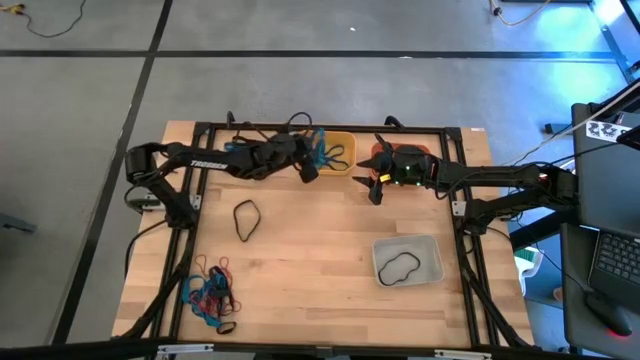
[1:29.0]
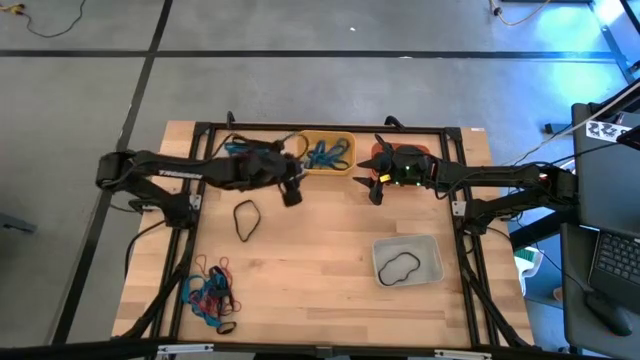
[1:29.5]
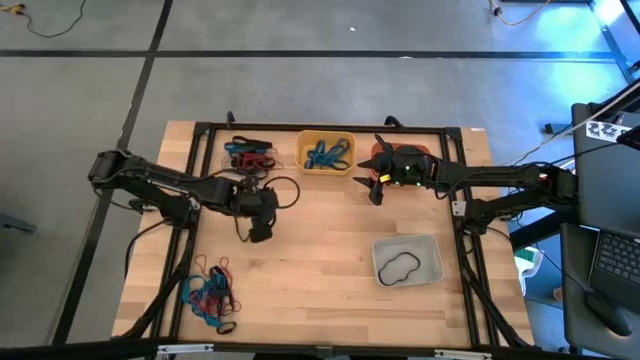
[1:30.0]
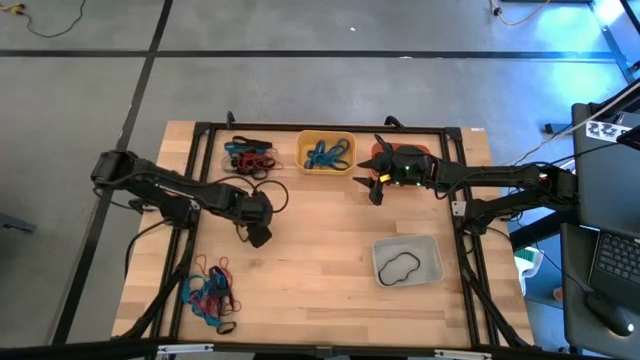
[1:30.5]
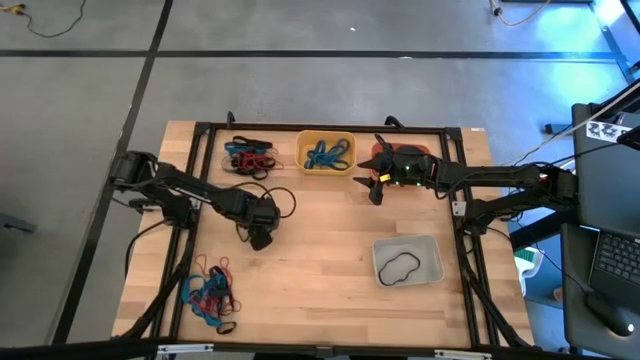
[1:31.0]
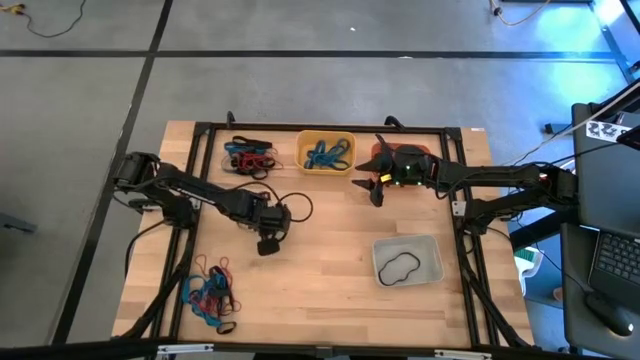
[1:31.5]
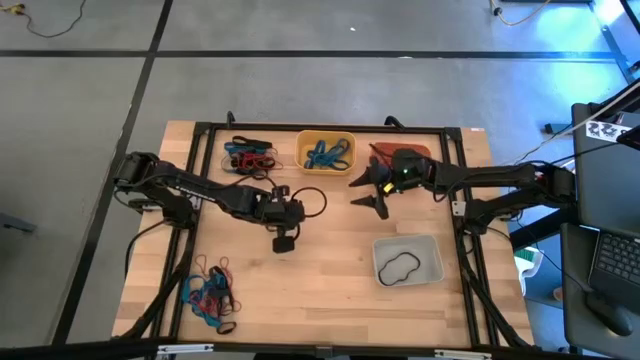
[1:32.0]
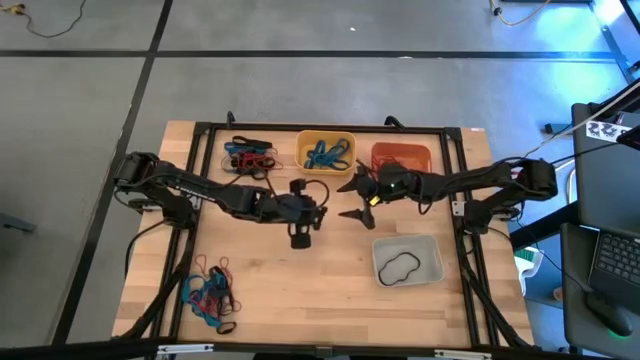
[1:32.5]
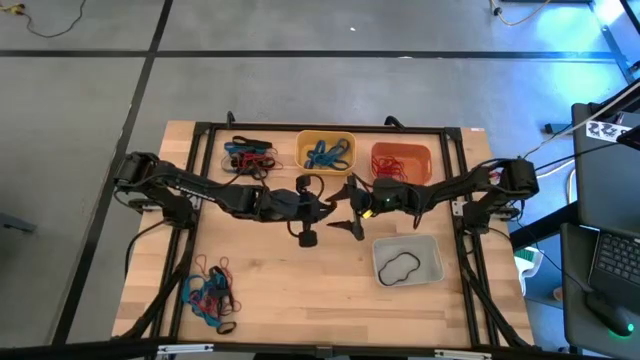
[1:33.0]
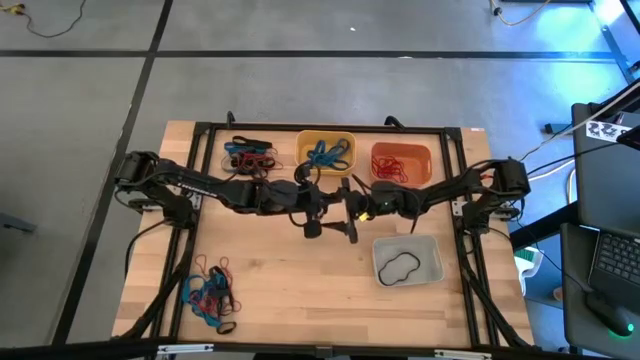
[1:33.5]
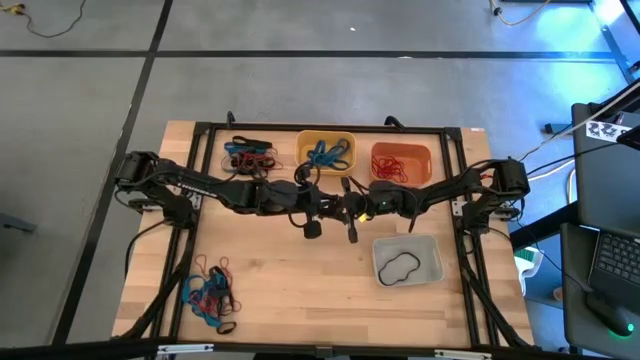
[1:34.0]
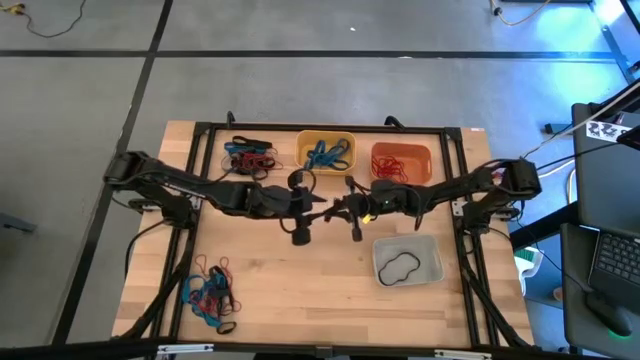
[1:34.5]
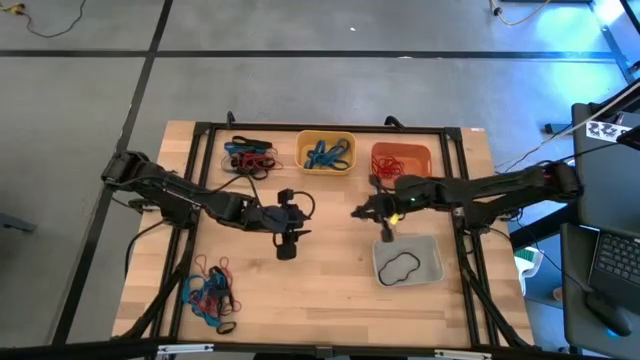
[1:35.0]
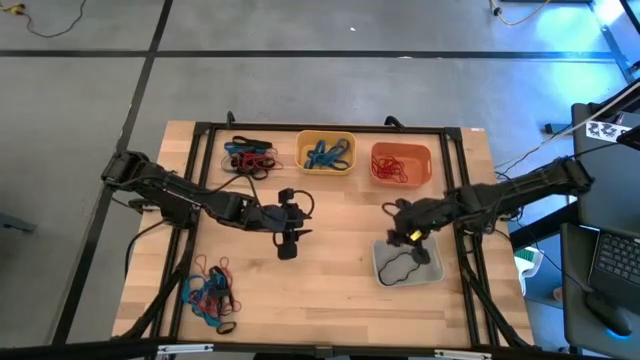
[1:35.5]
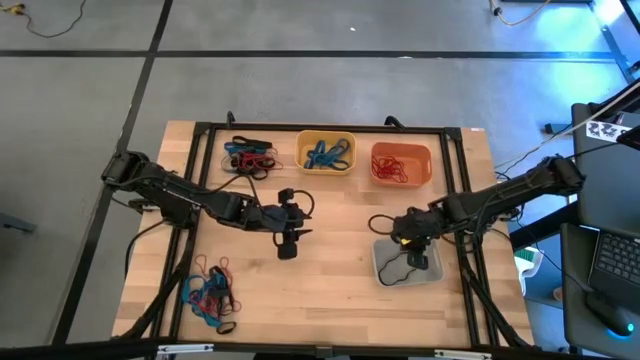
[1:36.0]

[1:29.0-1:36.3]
Task: Sort rubber bands into baskets
Put the black rubber band into the white bin

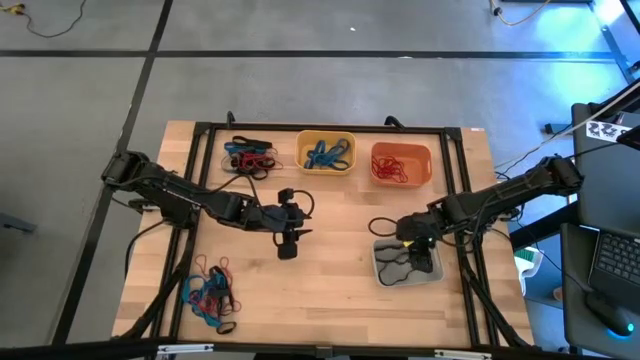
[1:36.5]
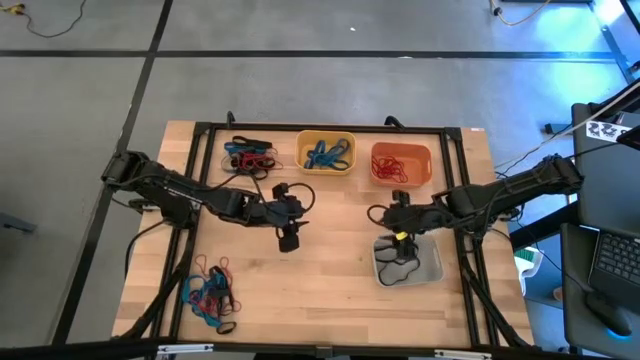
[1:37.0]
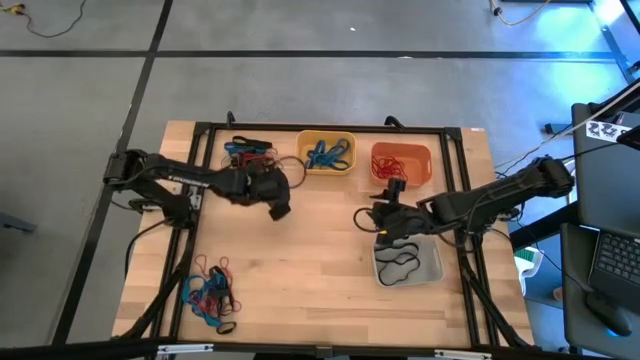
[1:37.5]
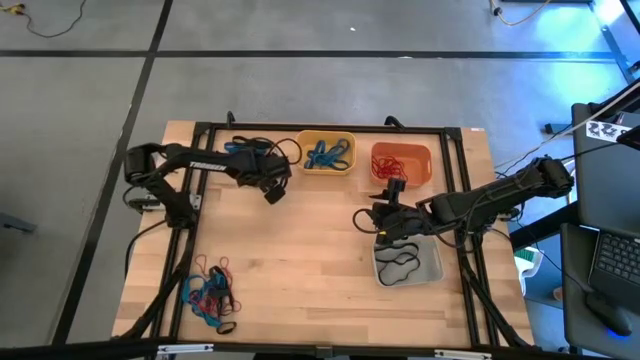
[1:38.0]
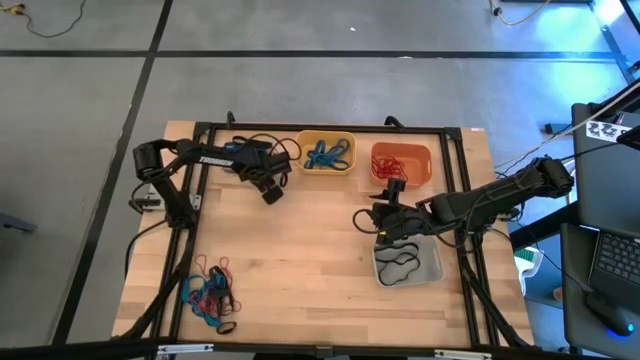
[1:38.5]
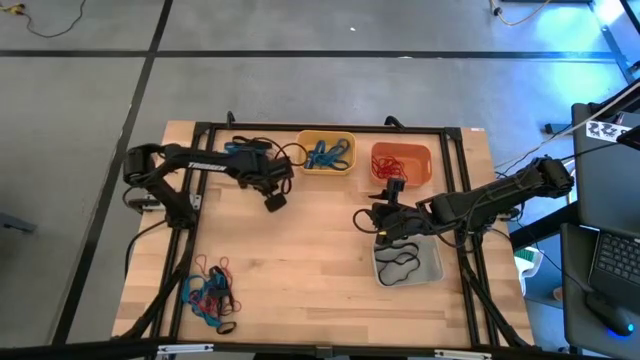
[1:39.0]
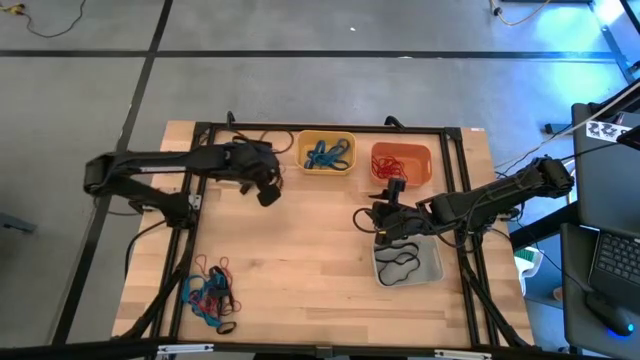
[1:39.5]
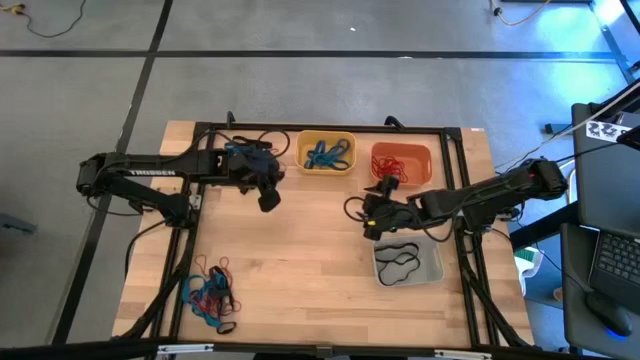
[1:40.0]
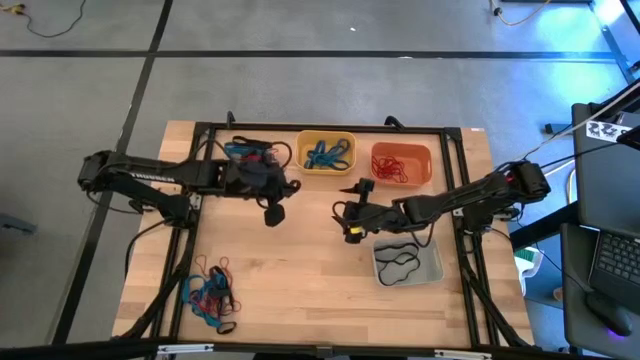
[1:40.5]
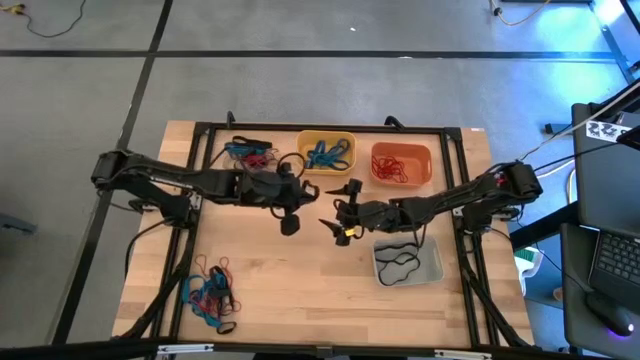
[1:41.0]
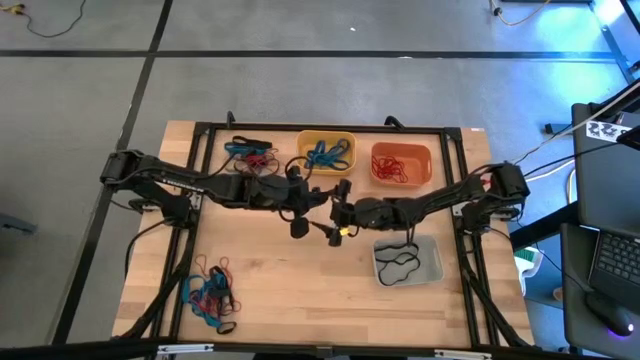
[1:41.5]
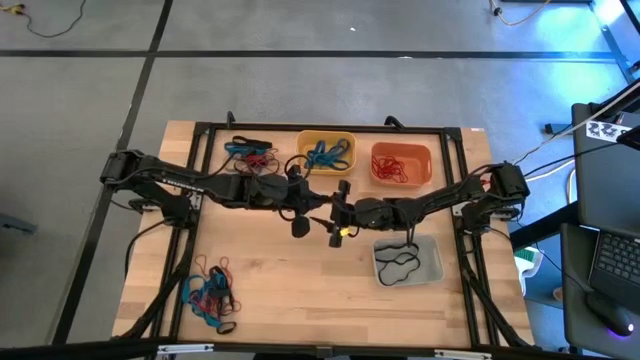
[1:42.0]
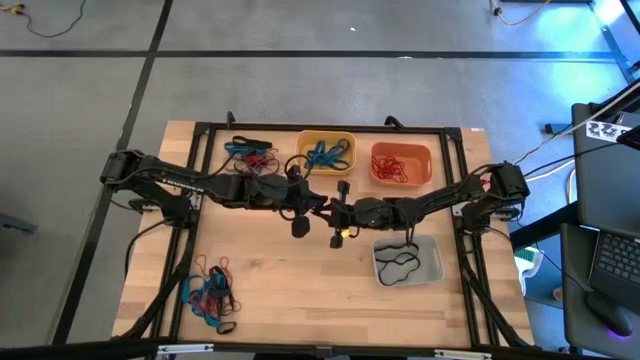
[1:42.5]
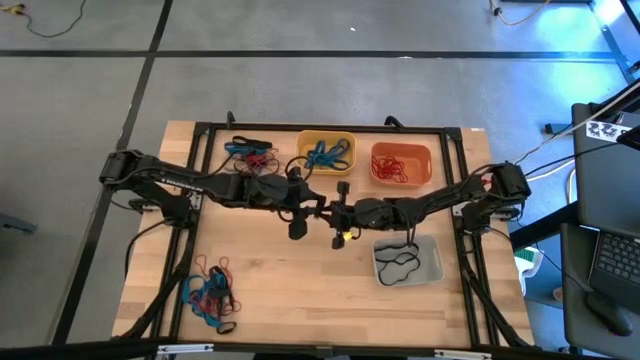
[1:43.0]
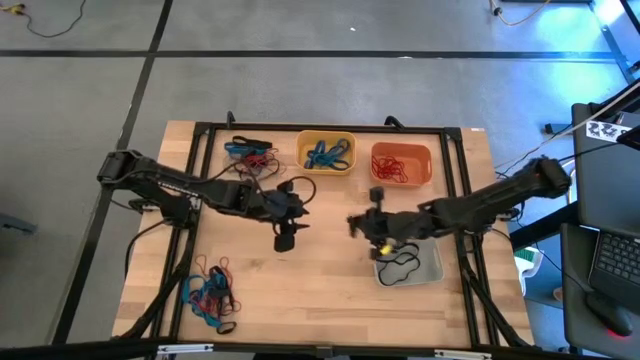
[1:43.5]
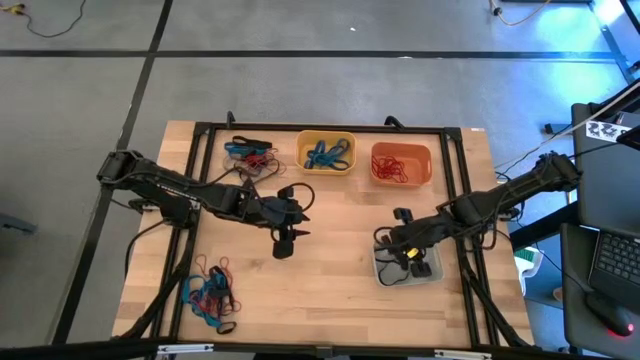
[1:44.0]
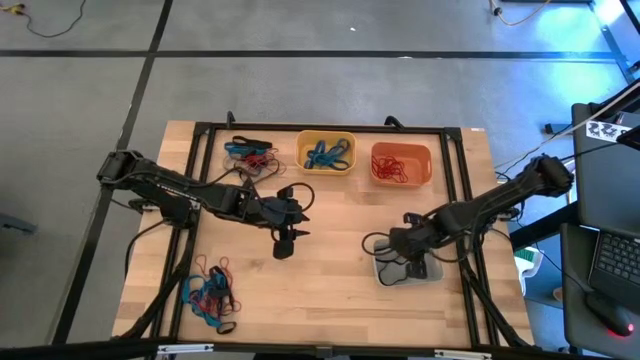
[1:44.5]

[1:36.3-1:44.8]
Put the black rubber band into the white bin

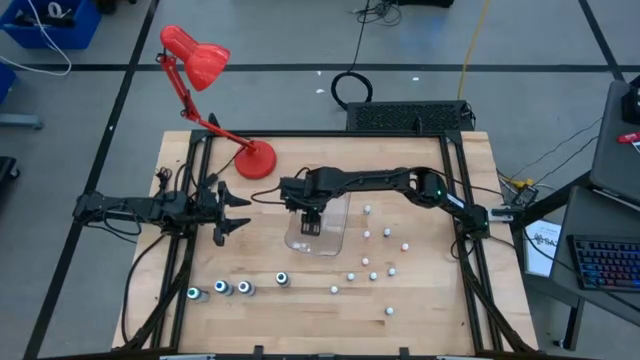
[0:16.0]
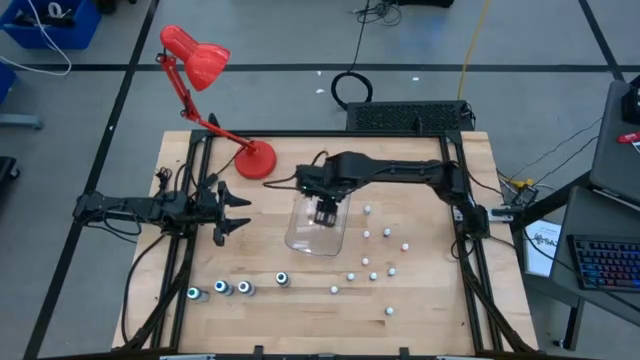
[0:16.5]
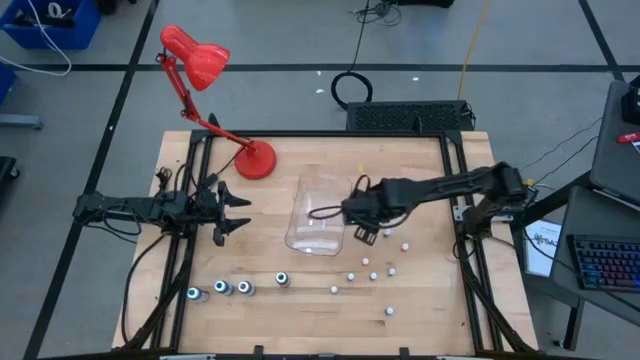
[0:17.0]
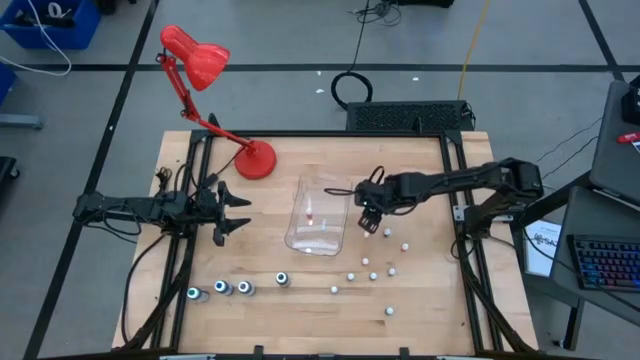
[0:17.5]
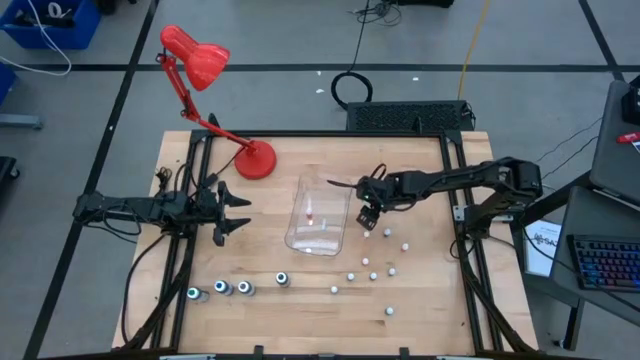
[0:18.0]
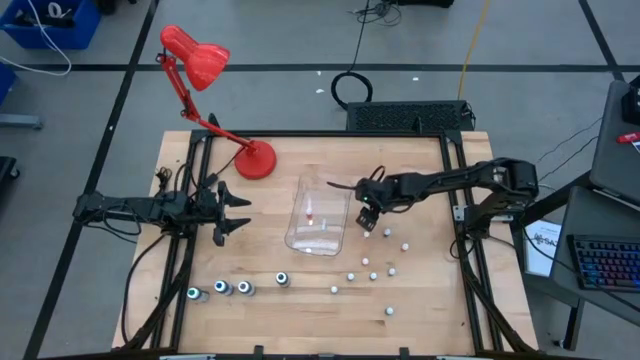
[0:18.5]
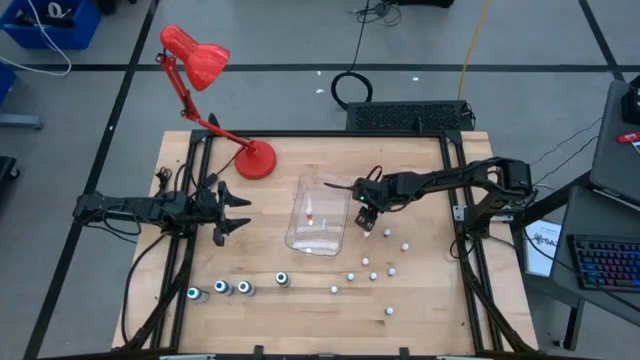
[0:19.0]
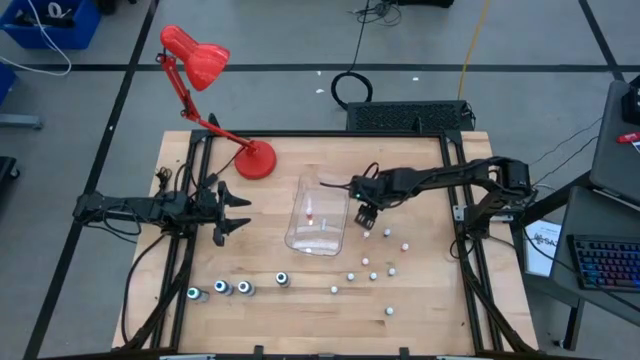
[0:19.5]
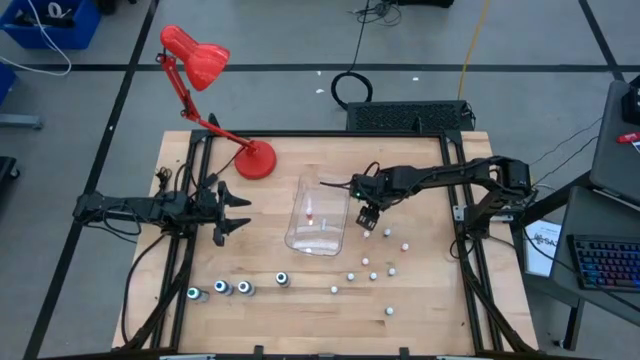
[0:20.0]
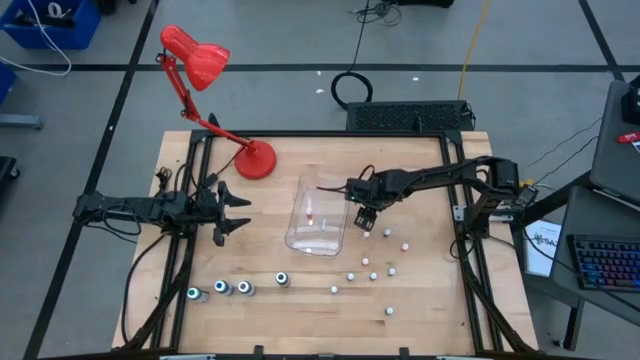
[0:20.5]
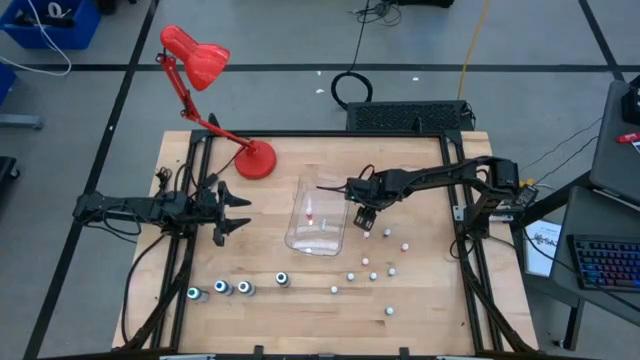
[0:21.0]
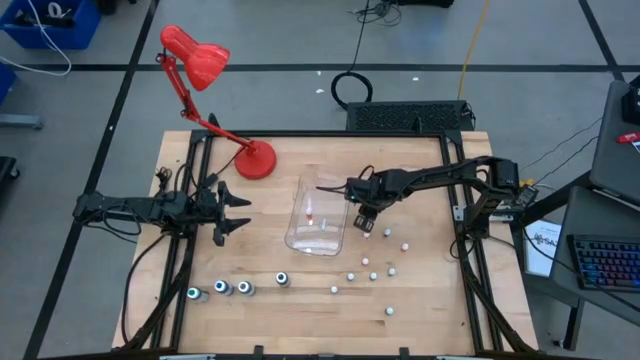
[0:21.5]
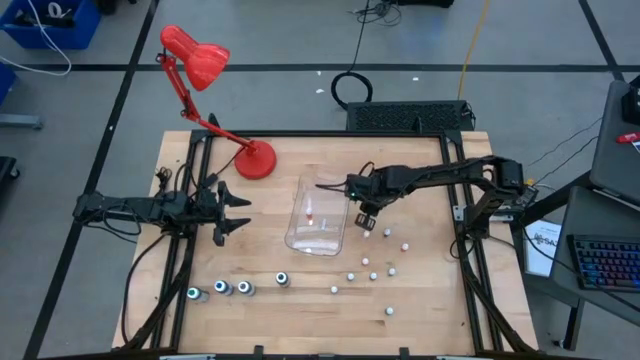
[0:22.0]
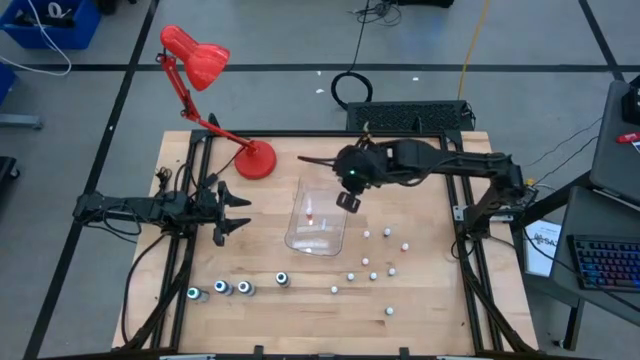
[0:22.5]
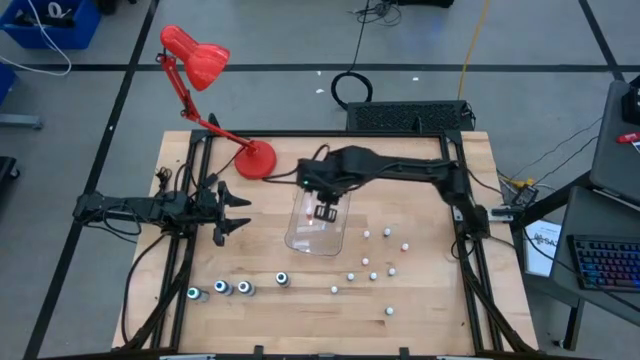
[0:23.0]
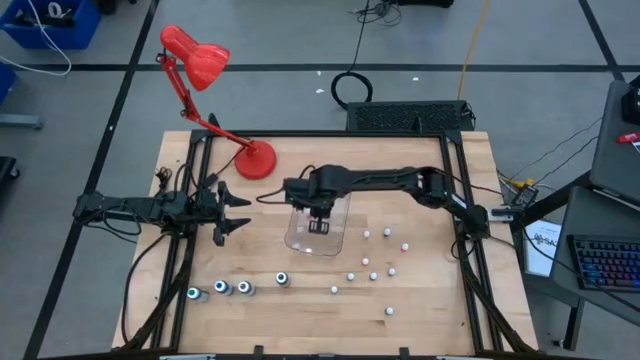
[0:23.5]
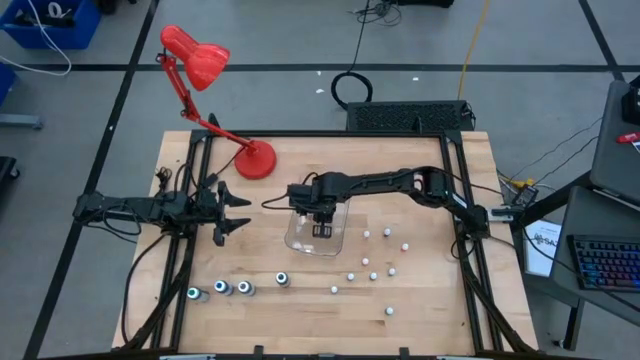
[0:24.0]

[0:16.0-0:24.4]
Task: Pick & Place food coloring
Put the small purple food coloring bottle into the transparent bin
